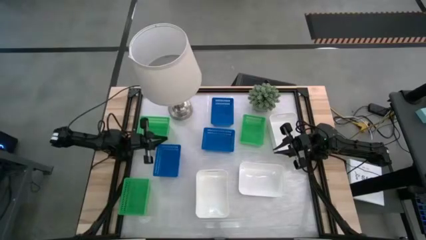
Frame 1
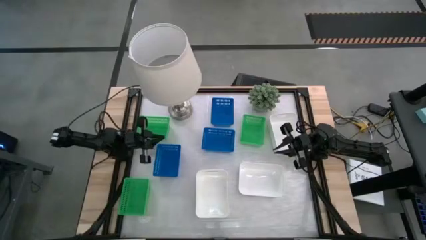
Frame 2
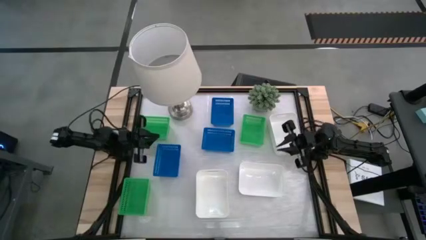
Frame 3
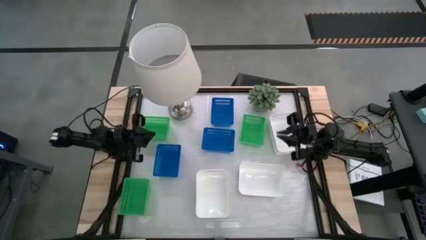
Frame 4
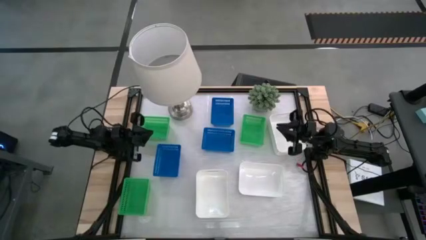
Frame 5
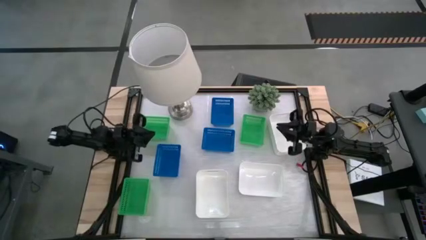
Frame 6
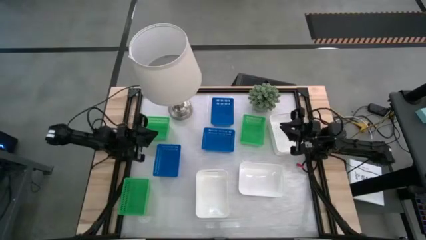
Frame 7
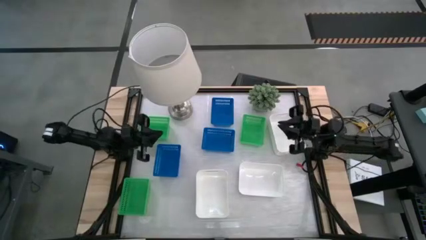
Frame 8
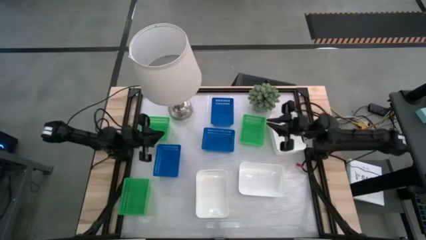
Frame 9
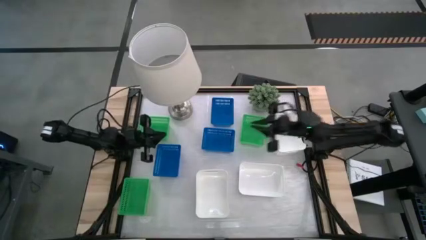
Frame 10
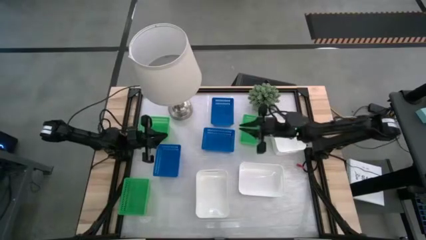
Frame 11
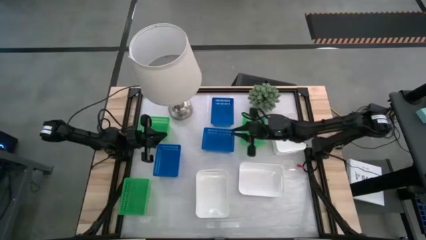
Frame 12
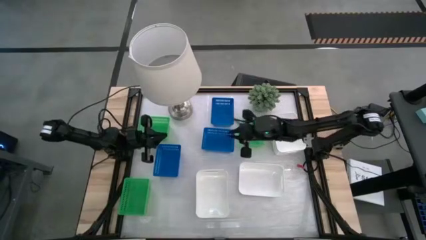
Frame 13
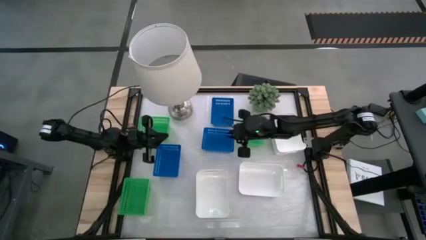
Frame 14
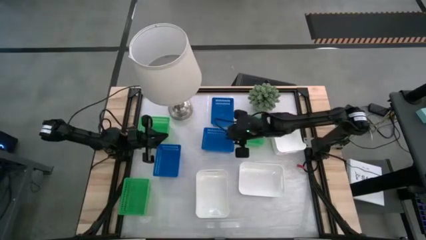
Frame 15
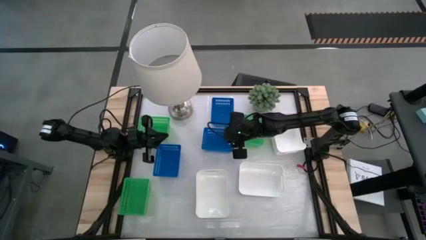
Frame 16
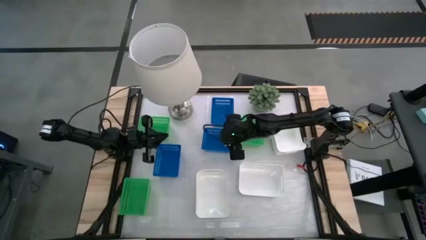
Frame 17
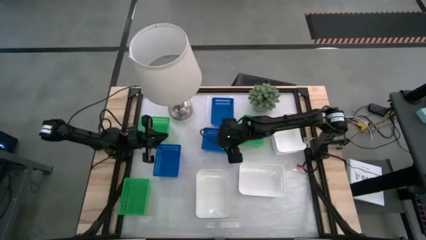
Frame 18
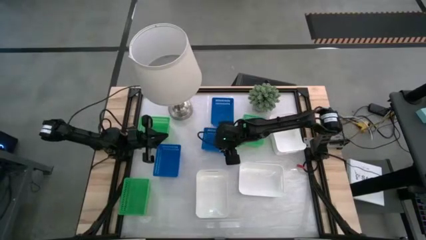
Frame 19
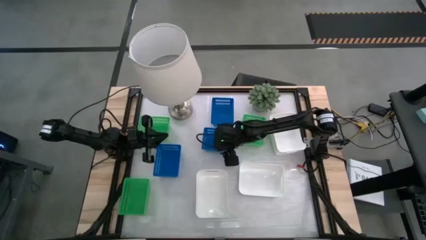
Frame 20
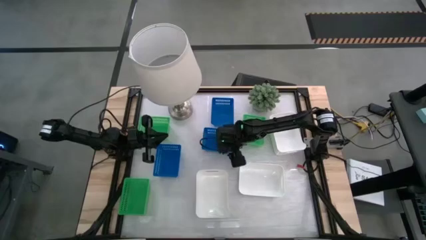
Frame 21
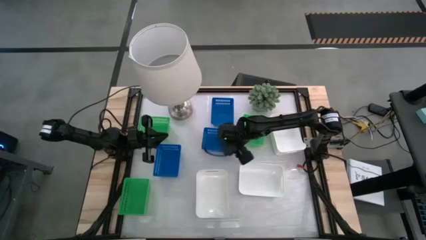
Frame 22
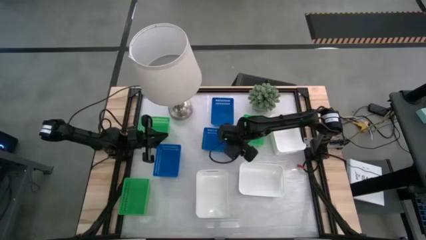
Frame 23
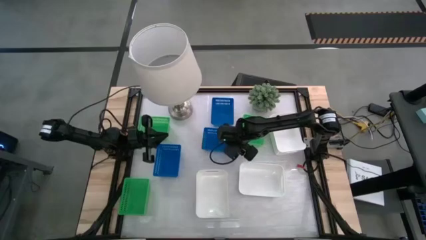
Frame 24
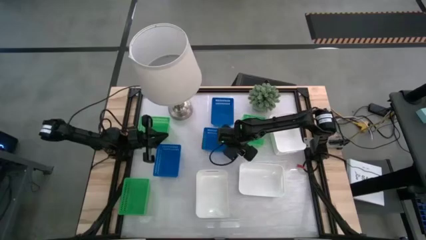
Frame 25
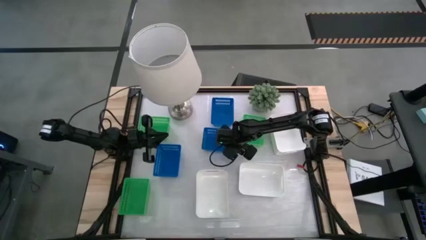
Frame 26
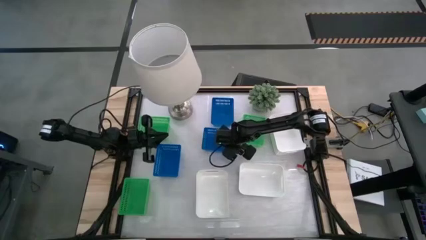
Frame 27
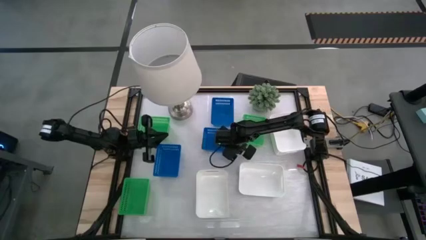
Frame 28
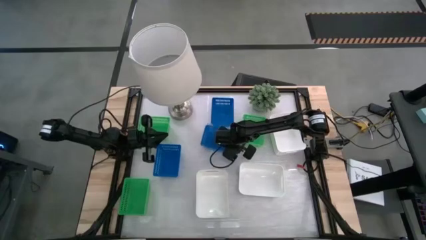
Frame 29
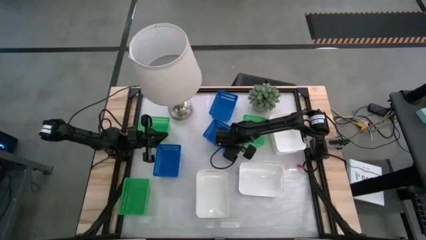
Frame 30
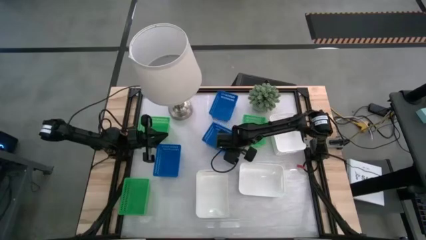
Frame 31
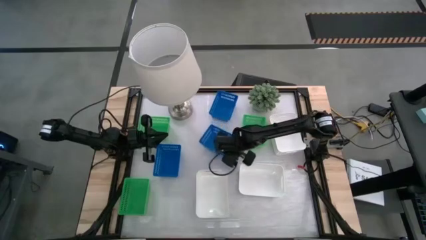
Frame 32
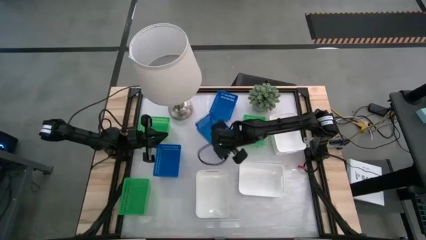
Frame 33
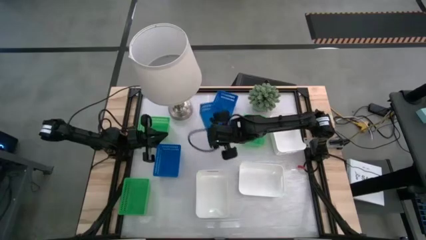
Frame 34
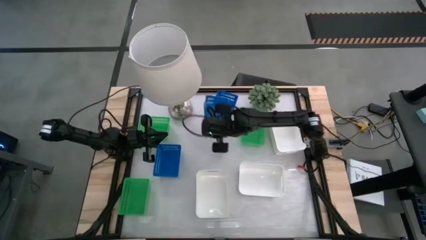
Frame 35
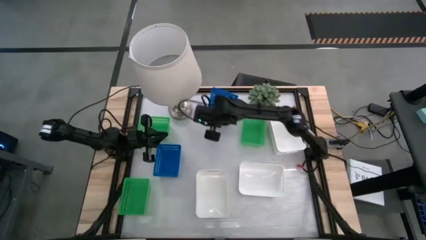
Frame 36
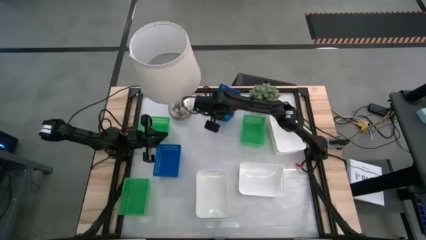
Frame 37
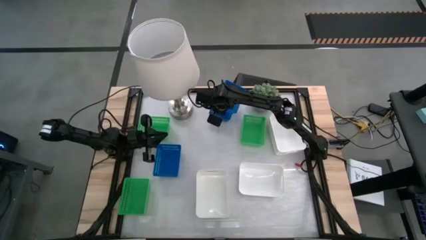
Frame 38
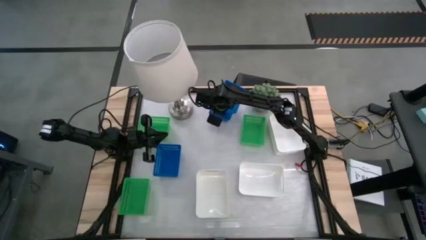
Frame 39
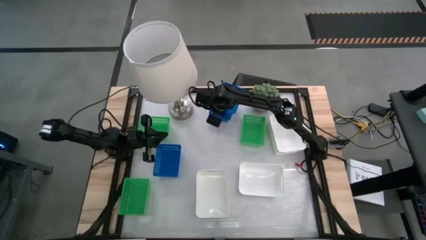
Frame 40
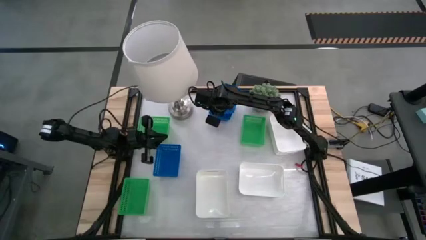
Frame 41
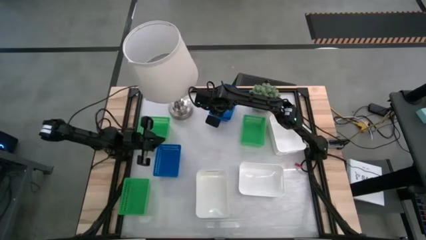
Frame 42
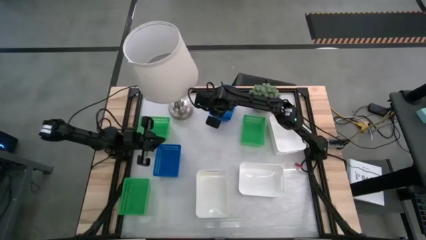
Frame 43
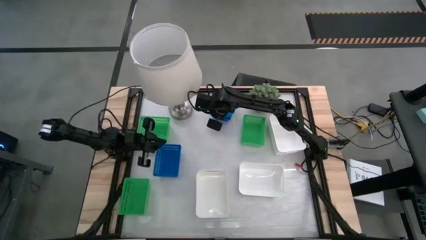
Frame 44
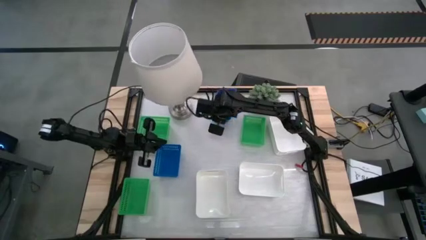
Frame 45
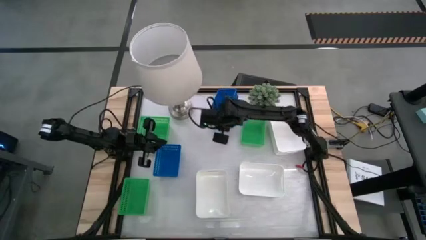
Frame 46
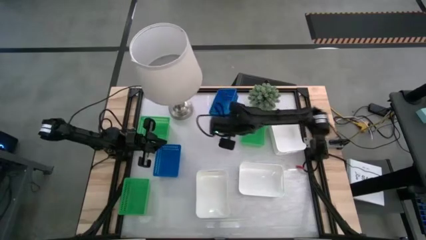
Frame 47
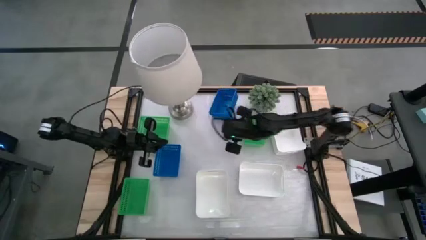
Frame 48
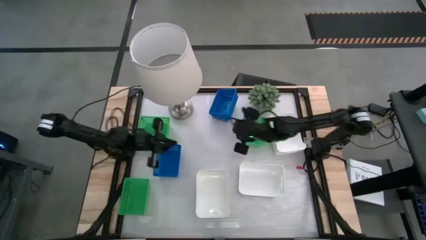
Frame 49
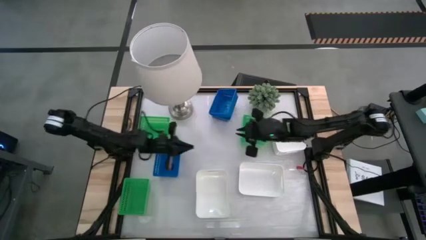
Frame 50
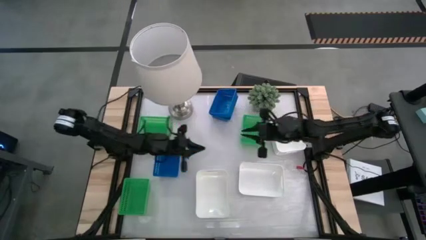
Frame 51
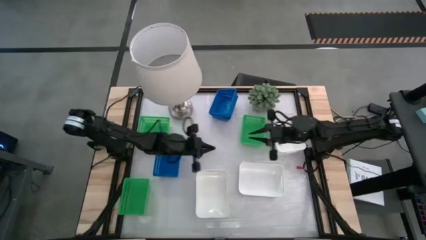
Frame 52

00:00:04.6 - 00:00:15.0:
Stack the middle blue bin on the top blue bin

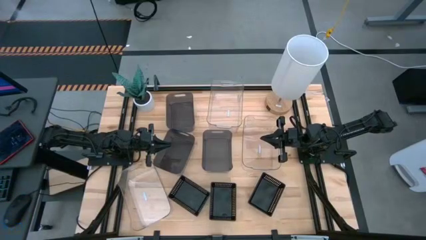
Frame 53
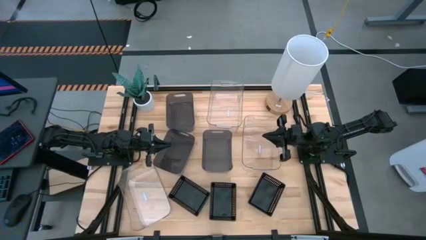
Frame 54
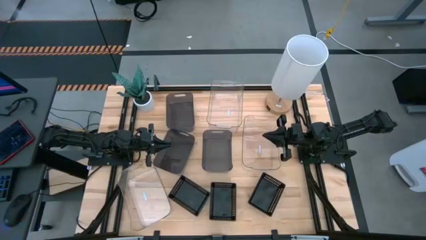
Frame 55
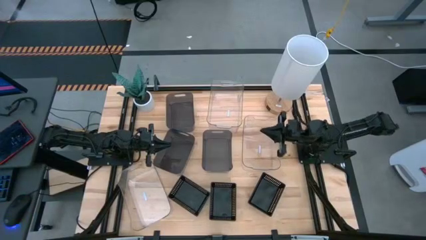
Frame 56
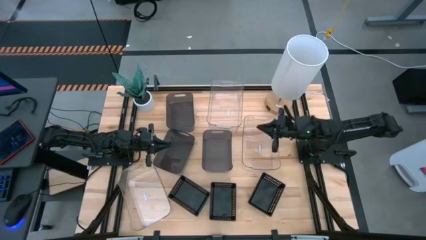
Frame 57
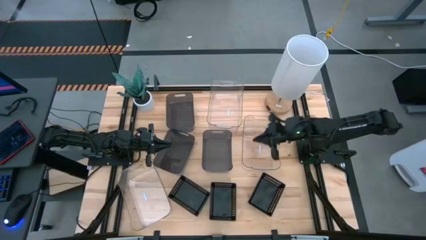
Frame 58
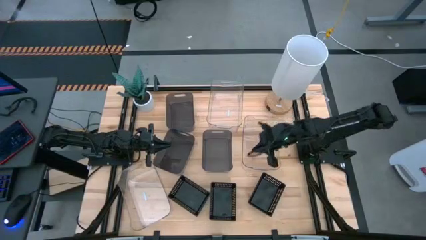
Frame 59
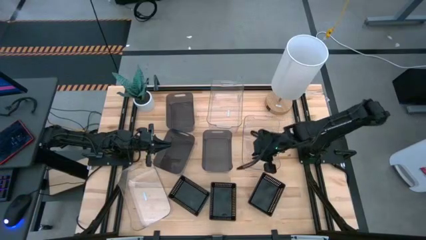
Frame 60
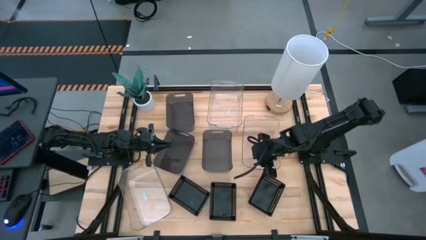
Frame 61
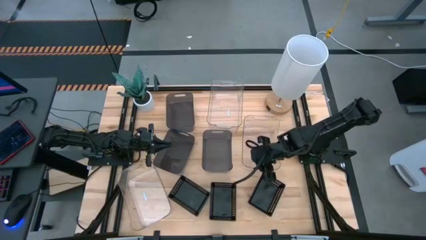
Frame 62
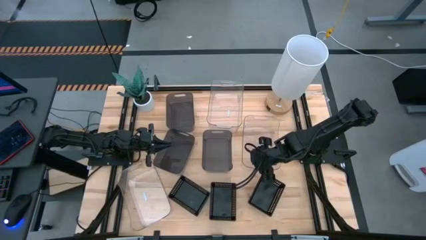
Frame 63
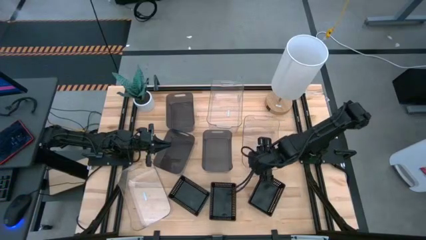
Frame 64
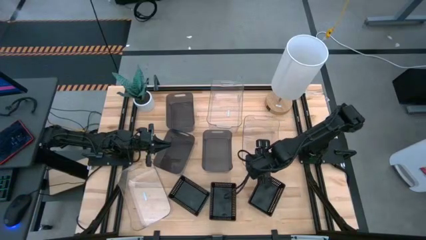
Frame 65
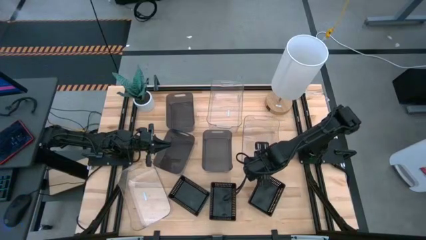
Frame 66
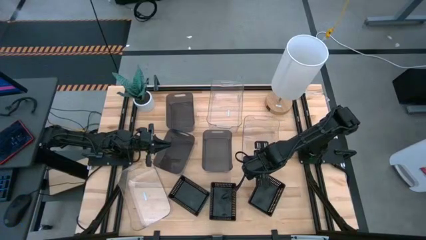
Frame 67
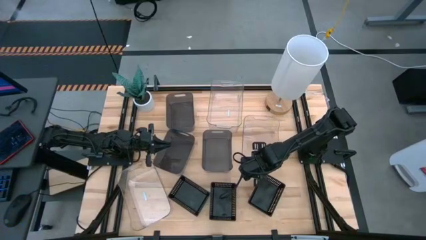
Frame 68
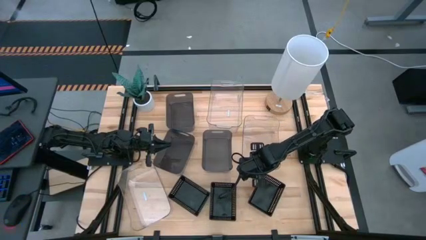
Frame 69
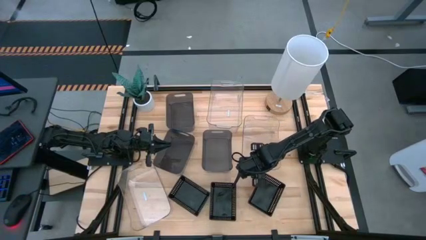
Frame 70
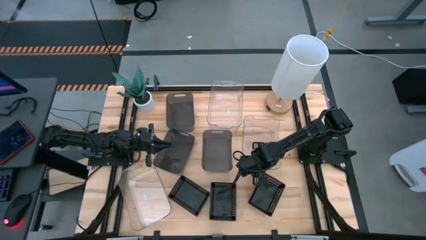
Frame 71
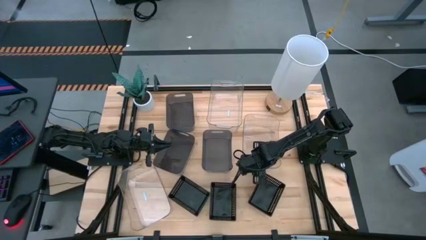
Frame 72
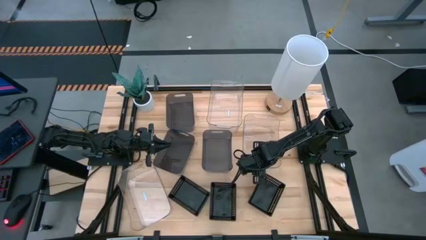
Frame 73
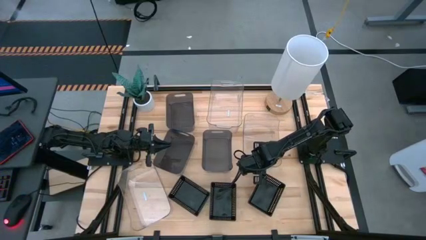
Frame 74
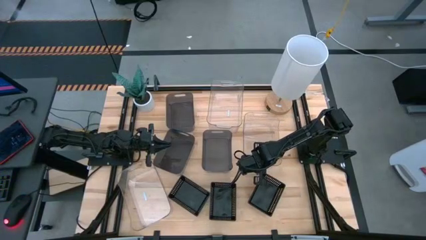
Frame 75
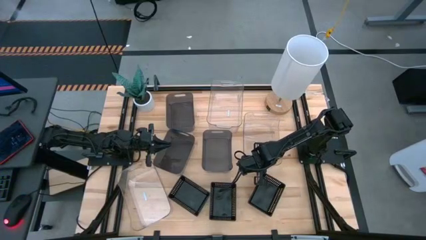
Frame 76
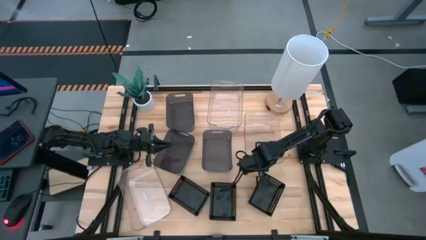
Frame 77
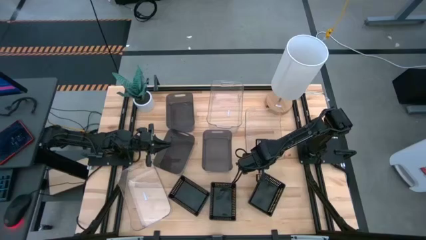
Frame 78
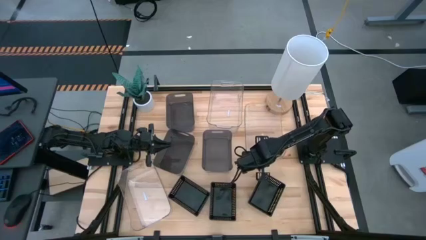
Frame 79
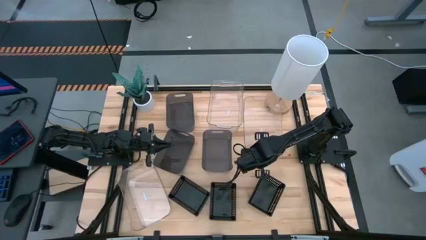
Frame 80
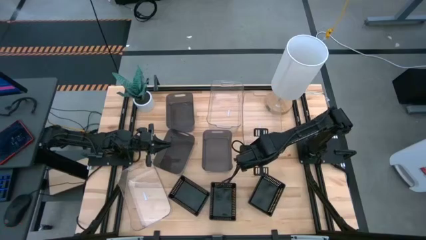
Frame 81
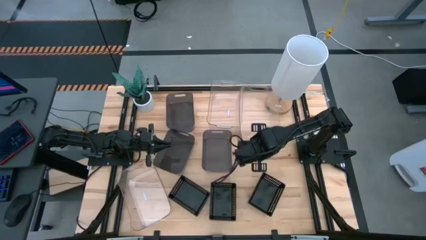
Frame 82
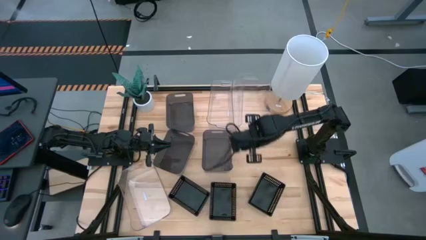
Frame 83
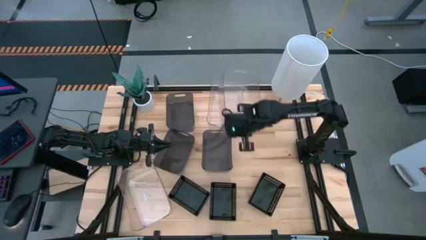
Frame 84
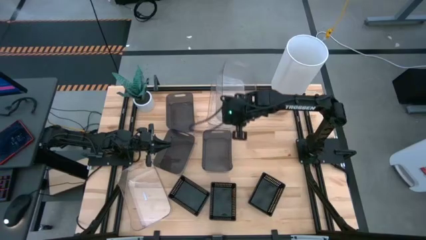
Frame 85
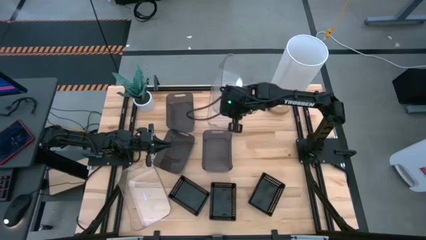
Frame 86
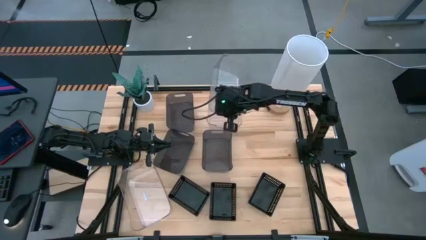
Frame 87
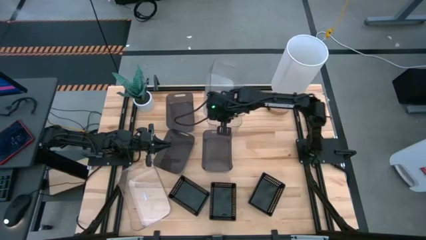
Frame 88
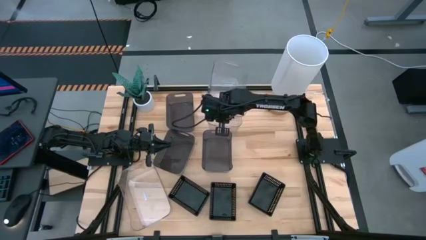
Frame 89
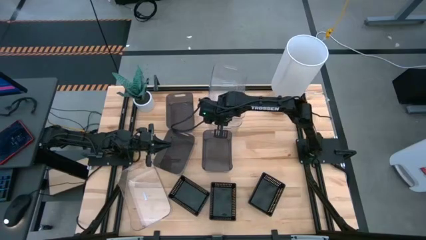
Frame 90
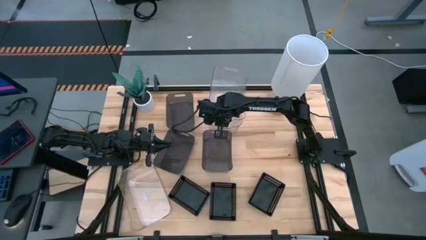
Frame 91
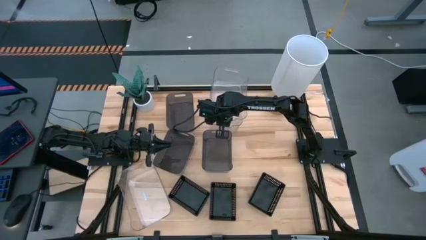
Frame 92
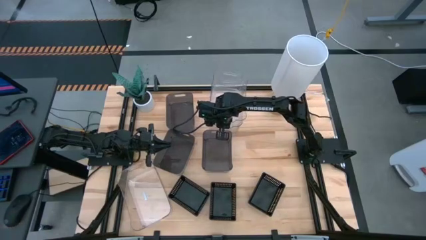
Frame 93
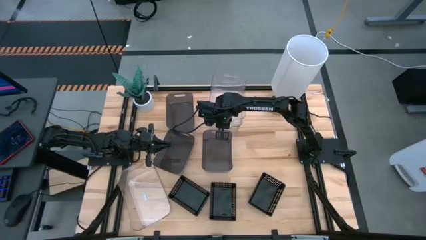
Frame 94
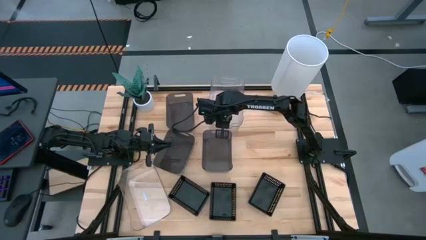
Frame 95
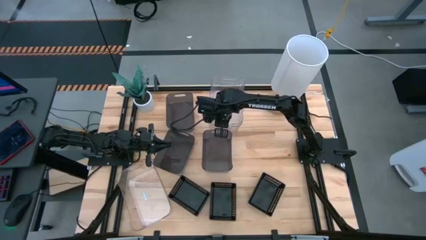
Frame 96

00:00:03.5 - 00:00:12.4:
Stack the right transparent bin on top of the top transparent bin
